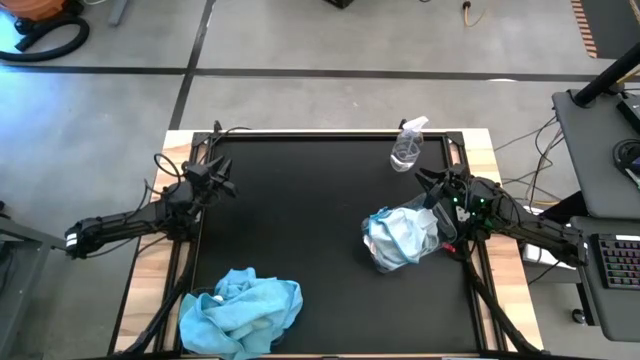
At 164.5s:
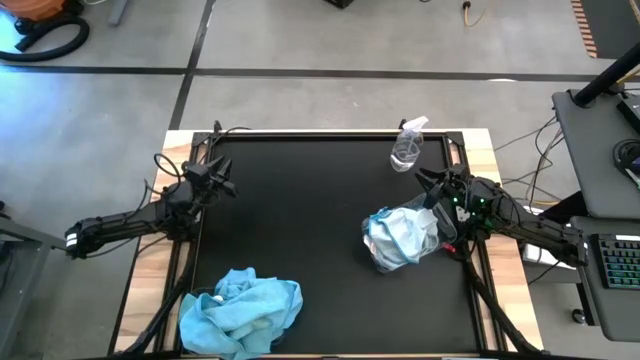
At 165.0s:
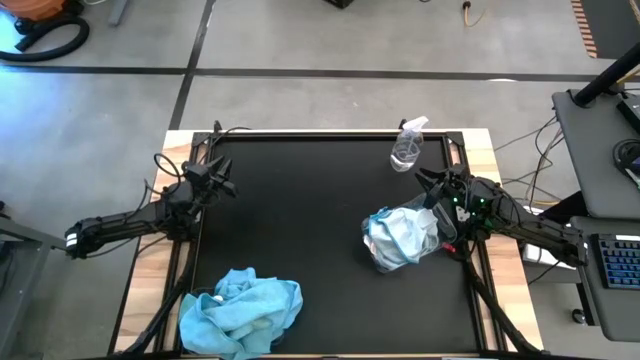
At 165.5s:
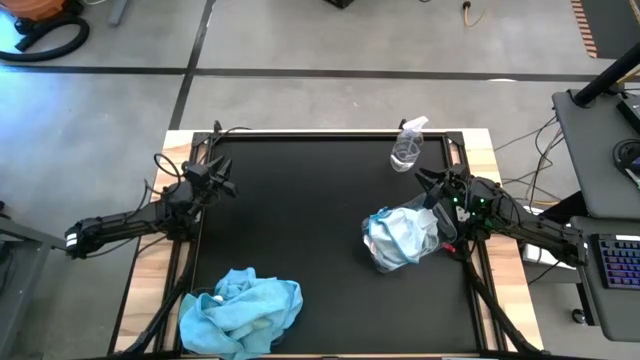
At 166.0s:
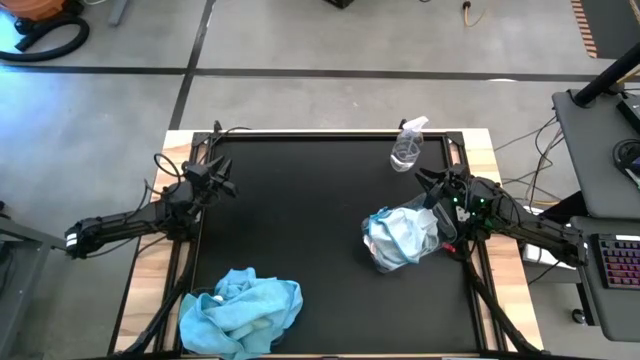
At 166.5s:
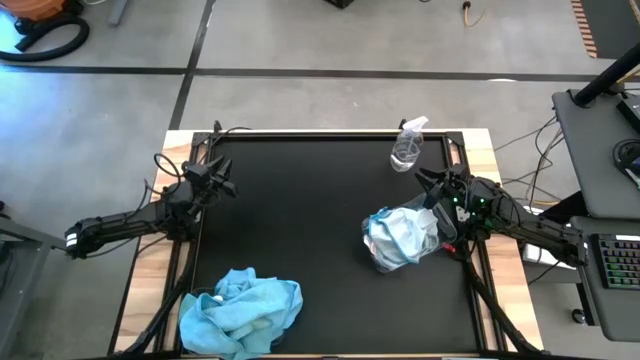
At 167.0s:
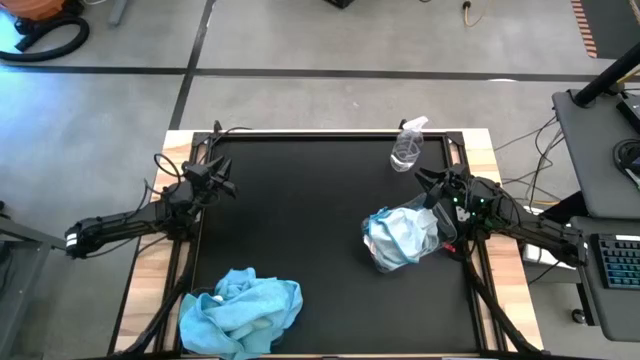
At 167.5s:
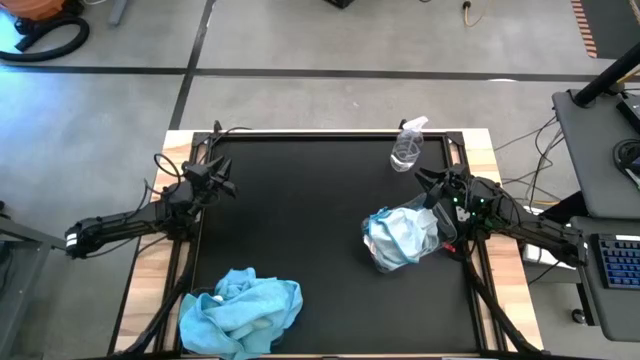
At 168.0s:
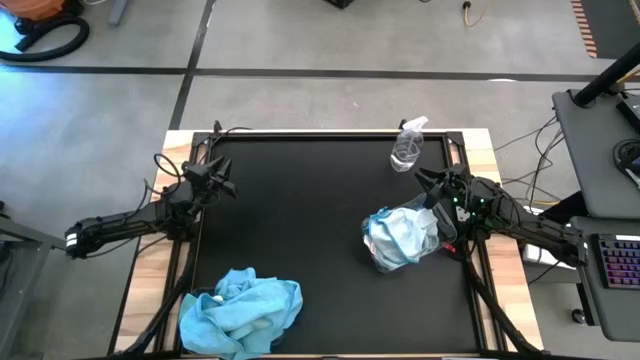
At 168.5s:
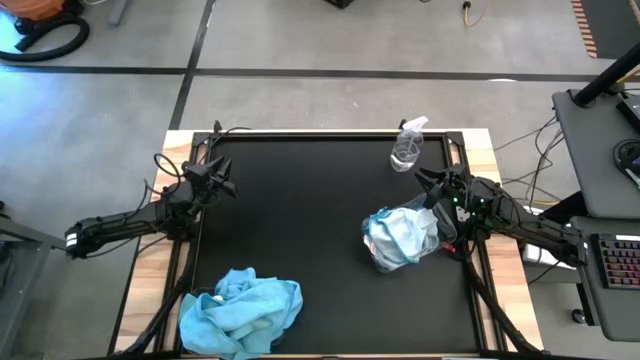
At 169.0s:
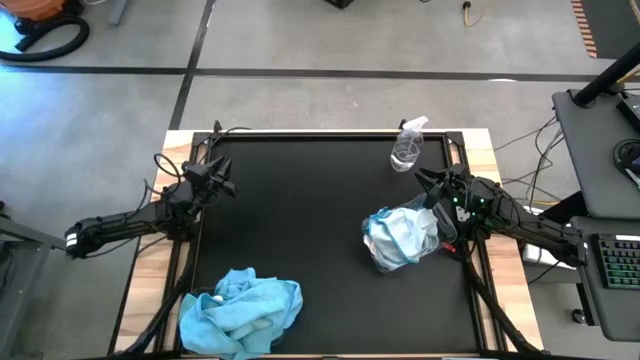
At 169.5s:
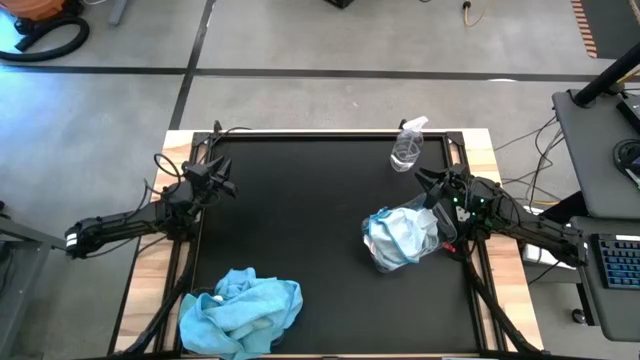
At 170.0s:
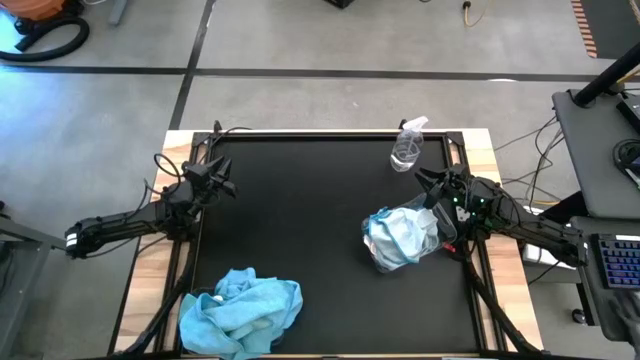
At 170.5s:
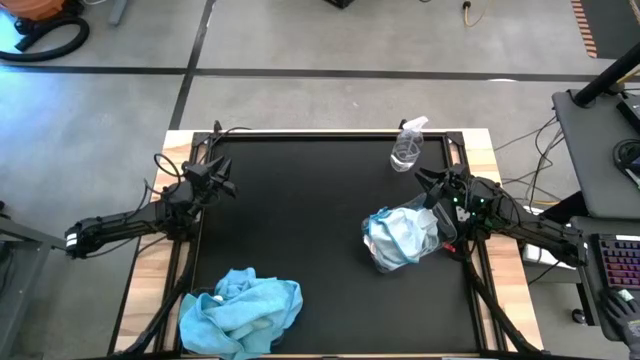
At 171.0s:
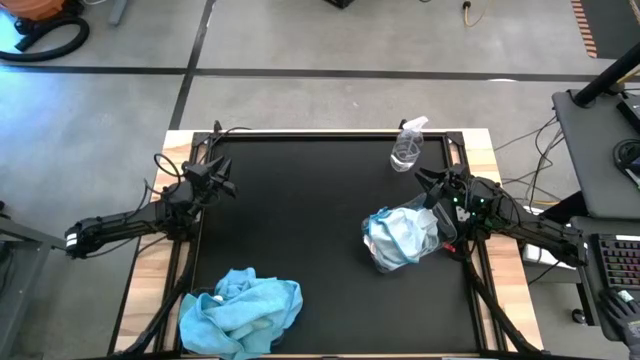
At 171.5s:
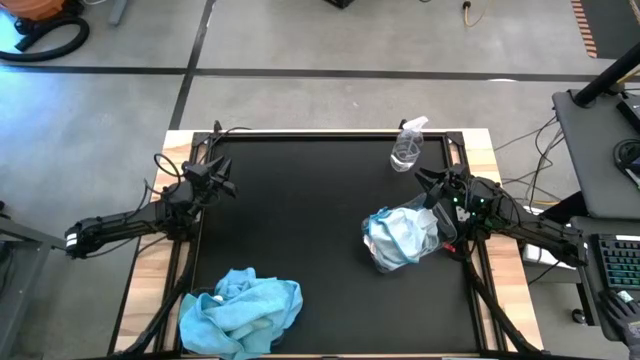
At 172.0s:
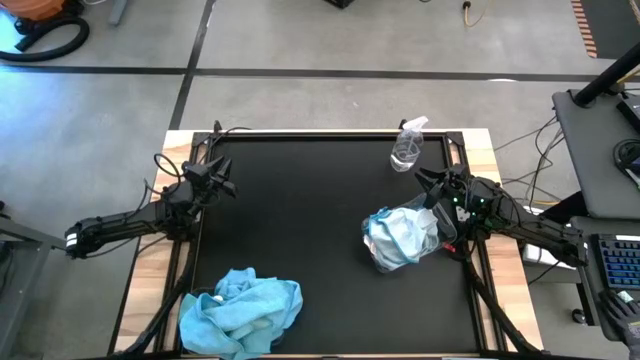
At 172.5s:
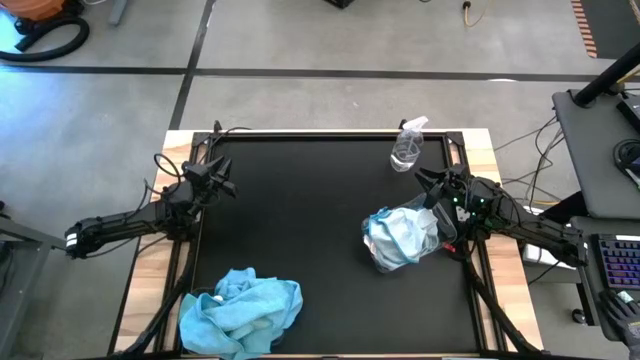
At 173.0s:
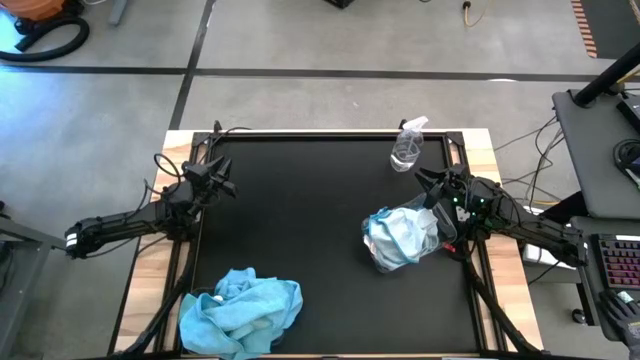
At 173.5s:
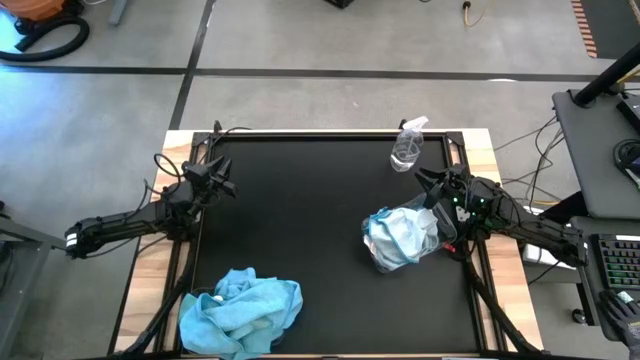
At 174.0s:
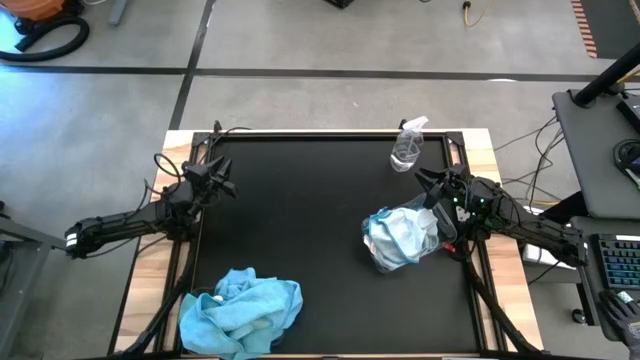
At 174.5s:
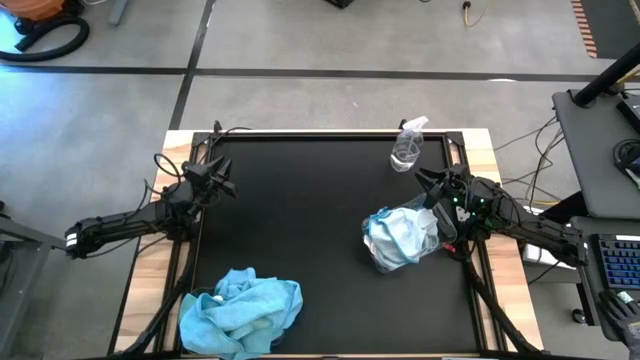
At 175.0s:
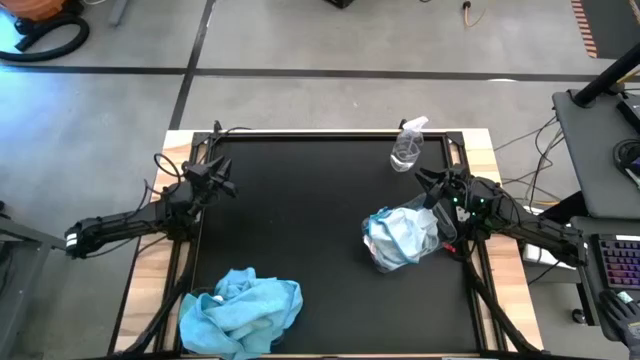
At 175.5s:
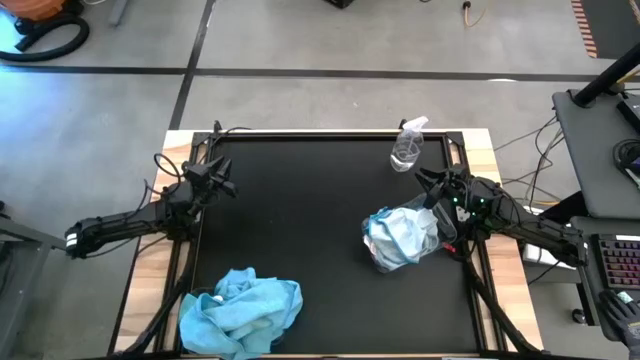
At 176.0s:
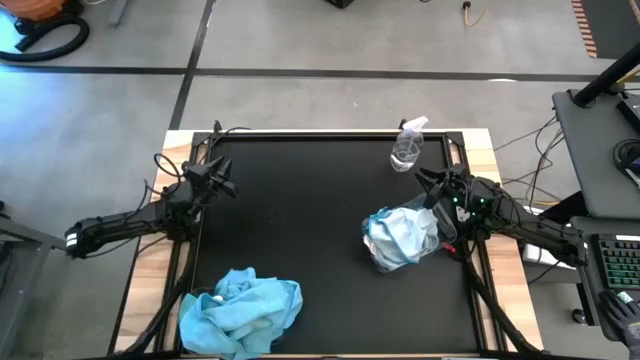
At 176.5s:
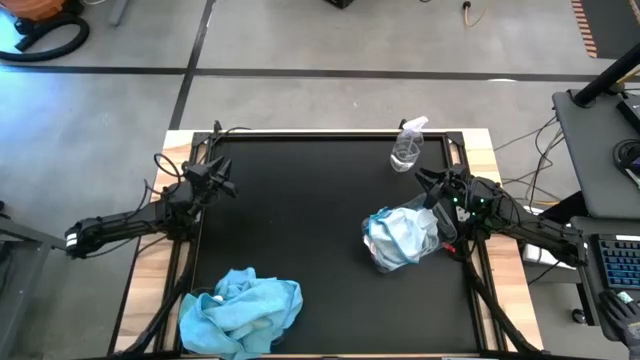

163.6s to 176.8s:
Task: Sort microfiber towel by color & place in baskets
Return to Home Position

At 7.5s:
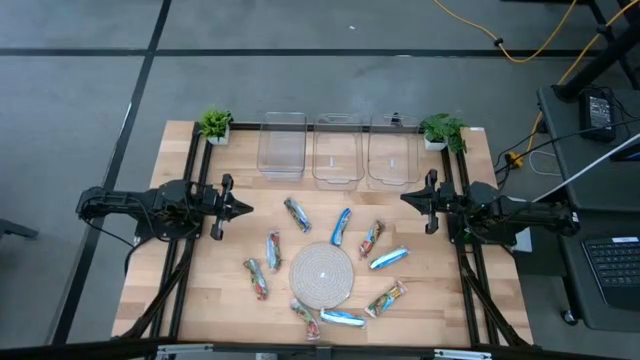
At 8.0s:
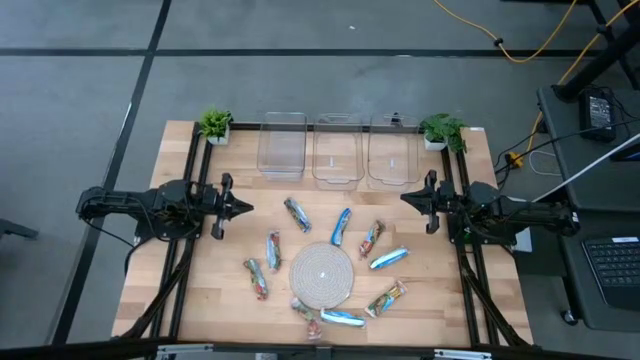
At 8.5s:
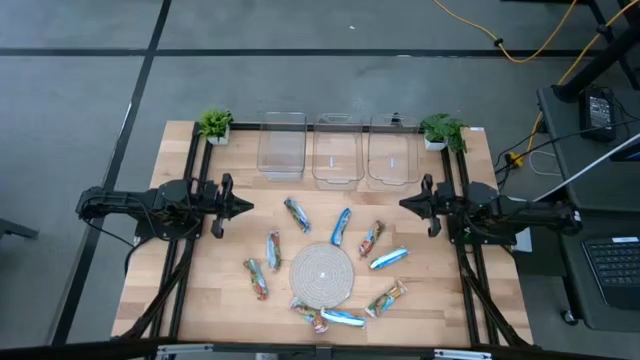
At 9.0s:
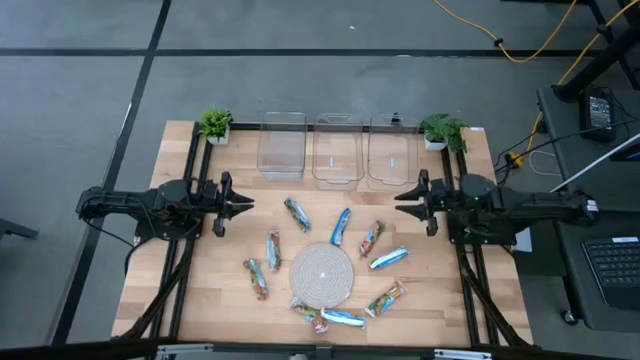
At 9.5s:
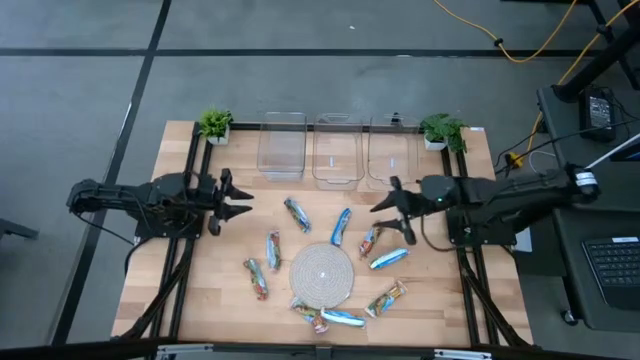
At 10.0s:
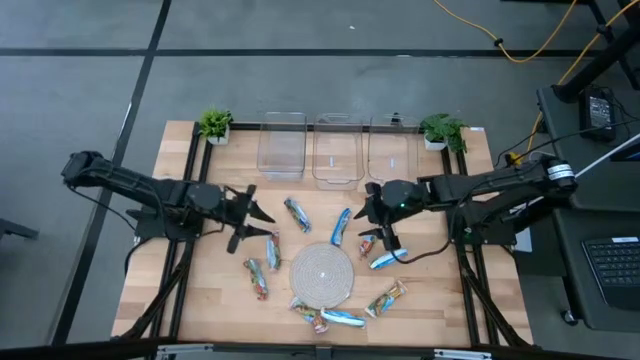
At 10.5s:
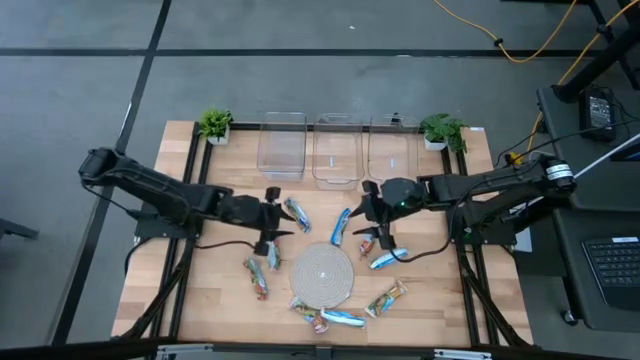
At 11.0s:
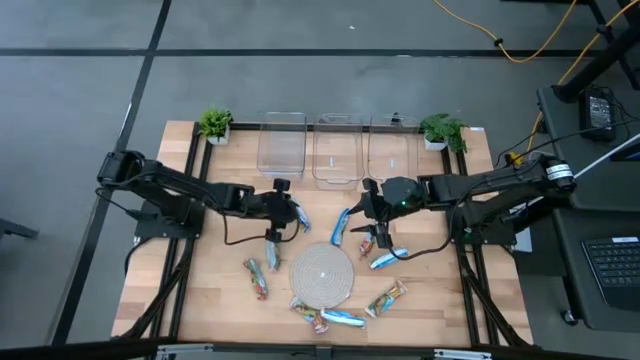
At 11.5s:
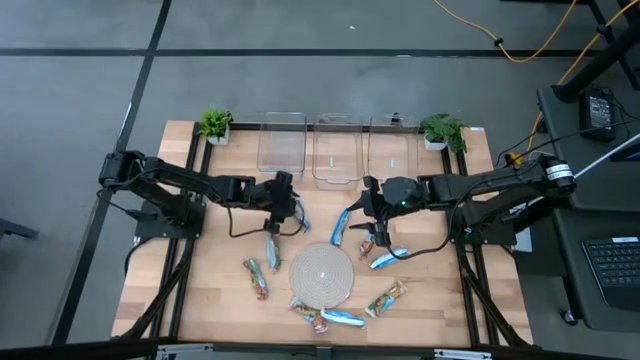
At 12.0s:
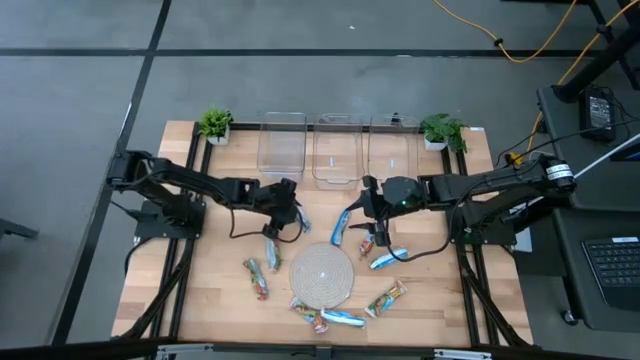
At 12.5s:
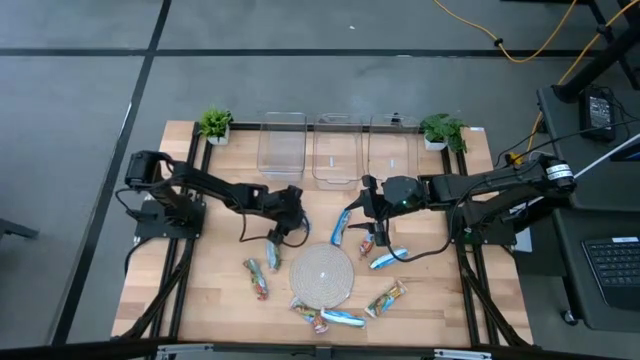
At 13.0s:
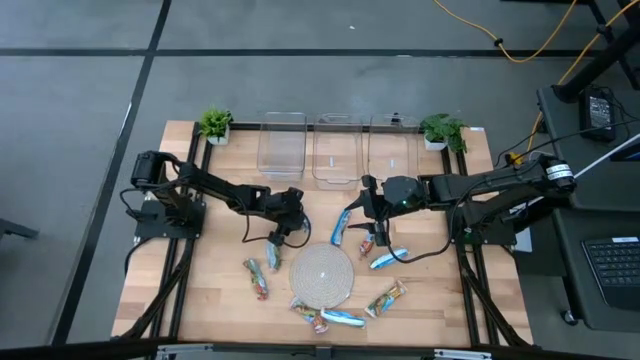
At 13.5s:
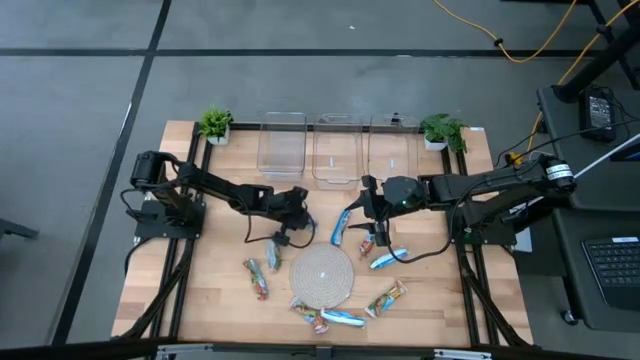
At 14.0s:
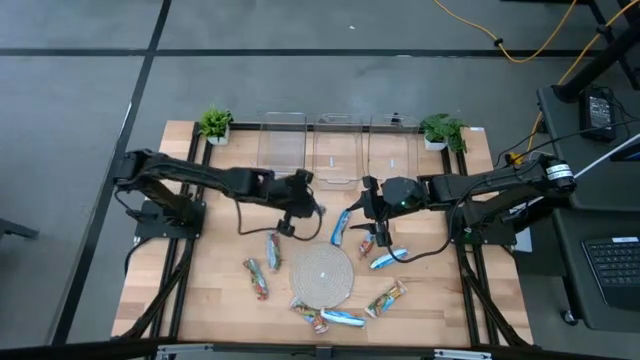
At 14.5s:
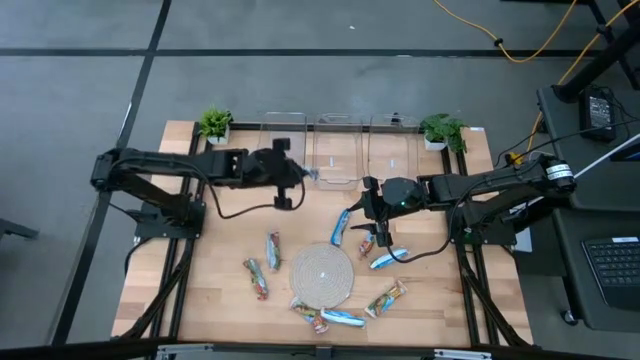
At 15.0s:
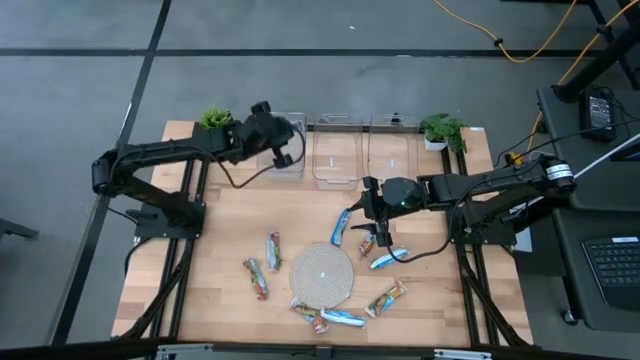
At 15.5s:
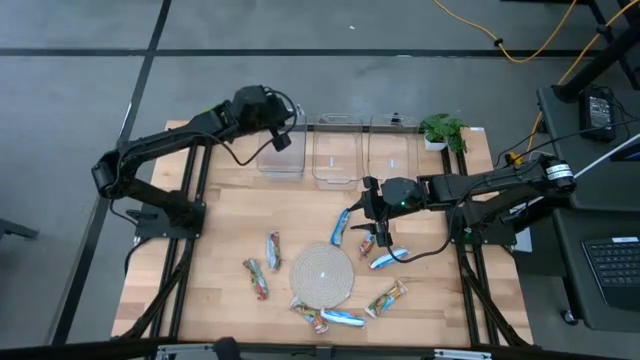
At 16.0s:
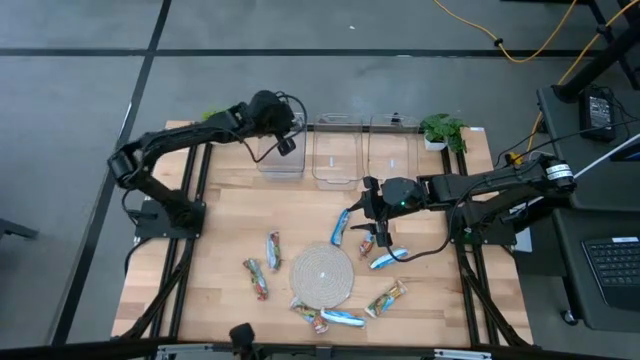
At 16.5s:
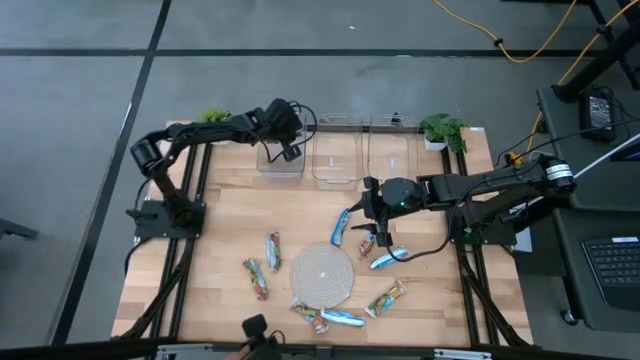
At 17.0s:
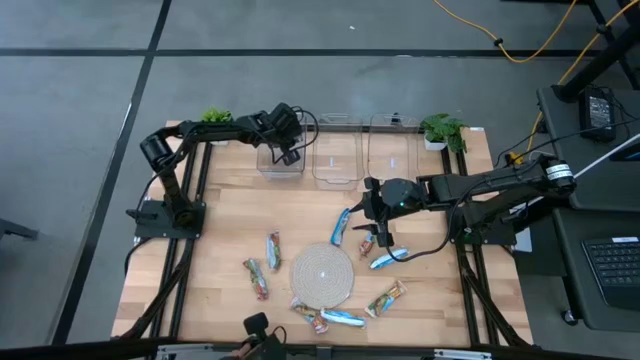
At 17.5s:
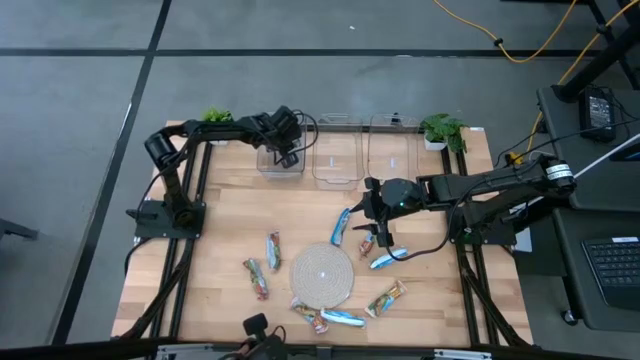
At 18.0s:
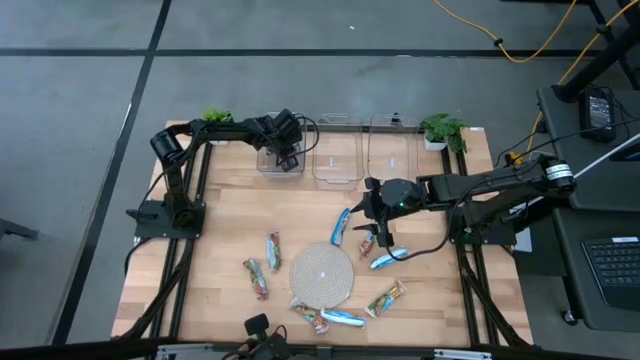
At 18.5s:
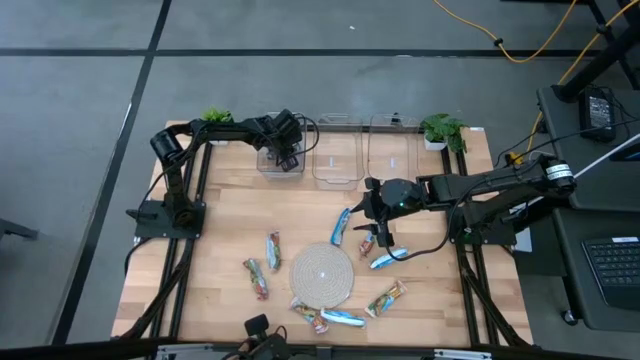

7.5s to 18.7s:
Task: Pick and place Granola Bars by type
Put the blue granola bar into the left transparent bin
